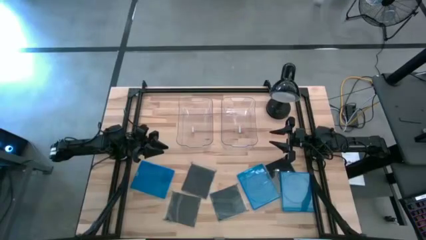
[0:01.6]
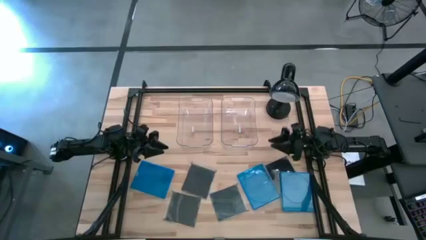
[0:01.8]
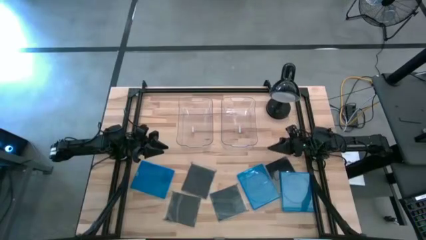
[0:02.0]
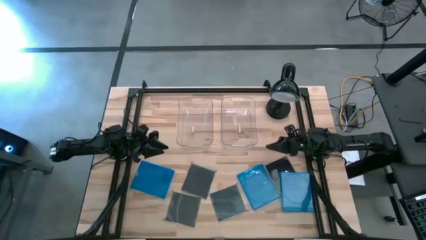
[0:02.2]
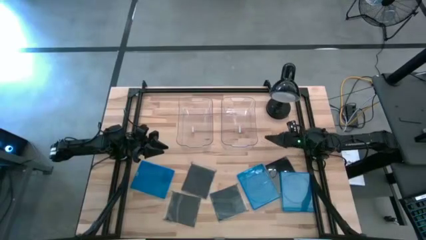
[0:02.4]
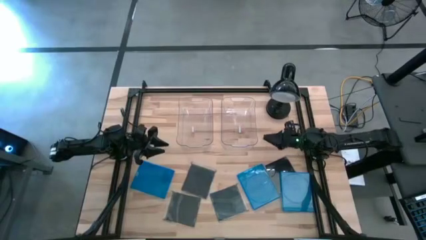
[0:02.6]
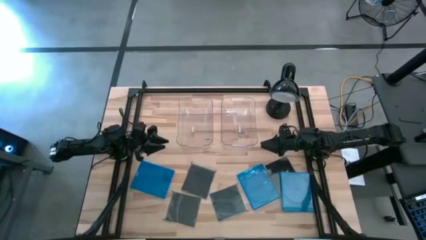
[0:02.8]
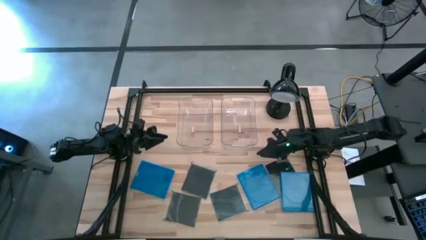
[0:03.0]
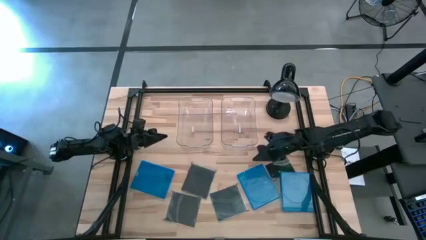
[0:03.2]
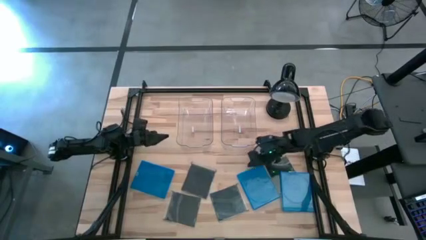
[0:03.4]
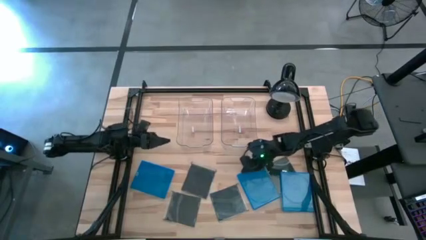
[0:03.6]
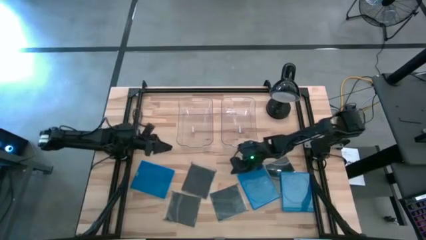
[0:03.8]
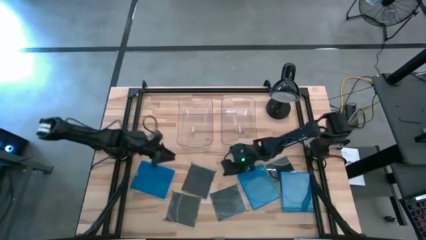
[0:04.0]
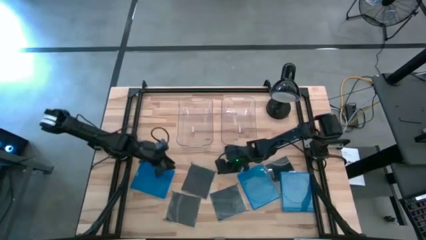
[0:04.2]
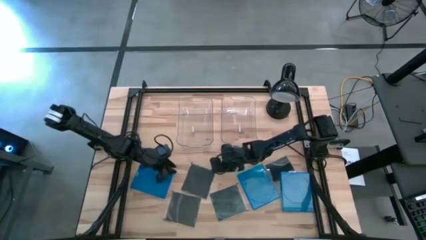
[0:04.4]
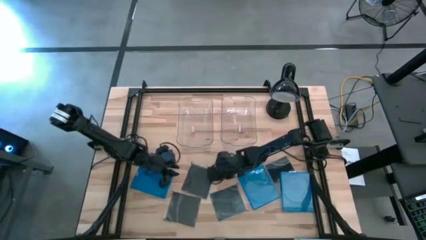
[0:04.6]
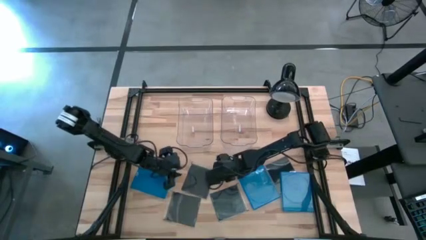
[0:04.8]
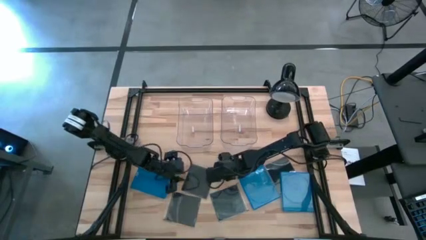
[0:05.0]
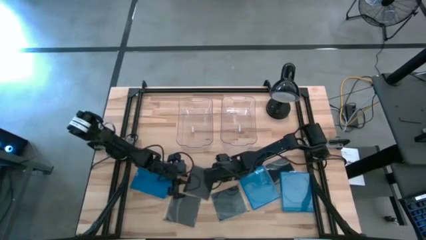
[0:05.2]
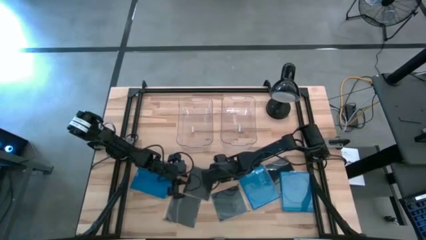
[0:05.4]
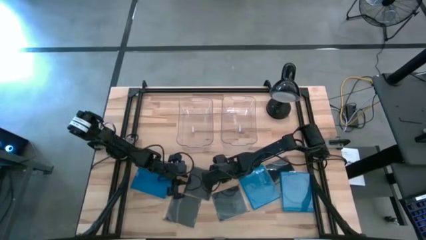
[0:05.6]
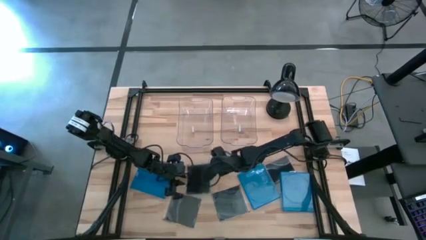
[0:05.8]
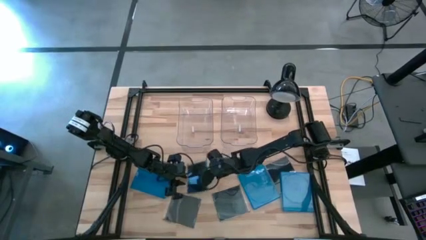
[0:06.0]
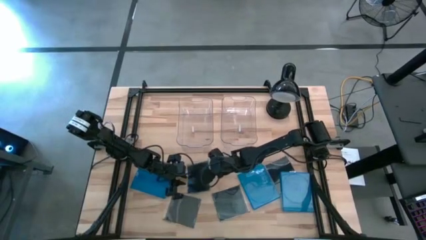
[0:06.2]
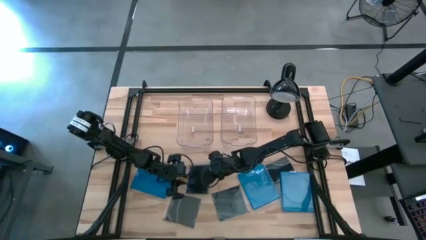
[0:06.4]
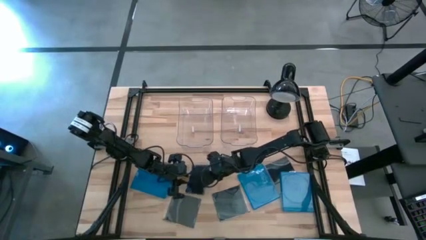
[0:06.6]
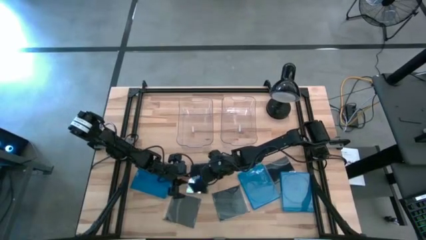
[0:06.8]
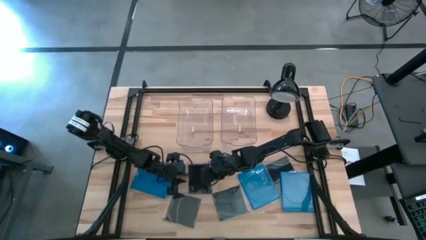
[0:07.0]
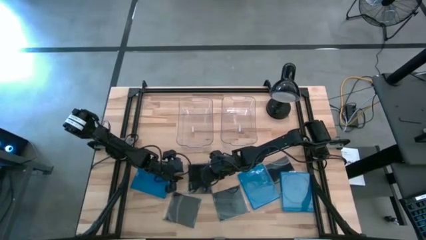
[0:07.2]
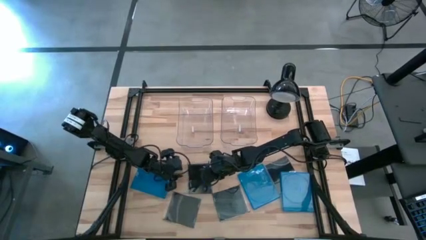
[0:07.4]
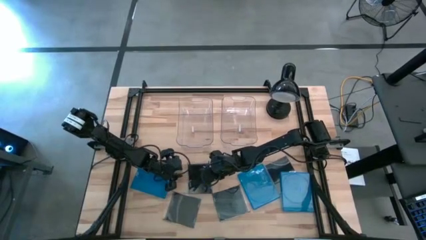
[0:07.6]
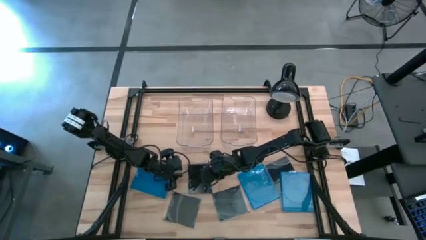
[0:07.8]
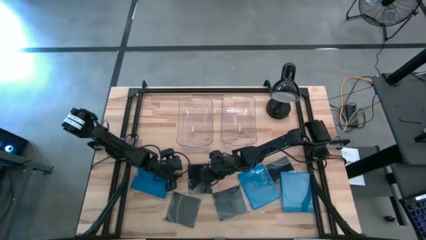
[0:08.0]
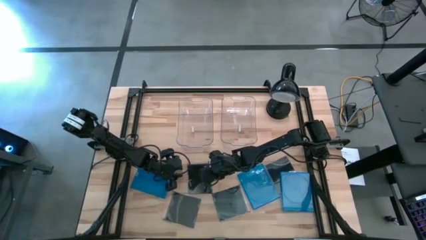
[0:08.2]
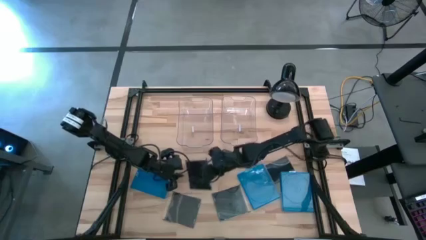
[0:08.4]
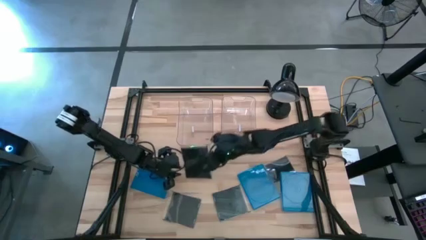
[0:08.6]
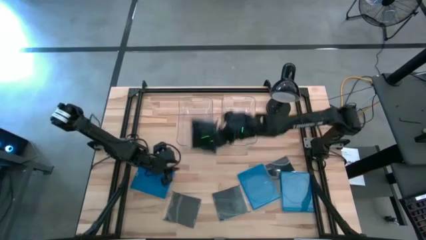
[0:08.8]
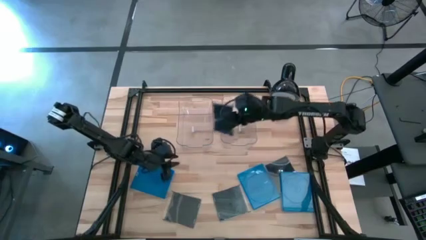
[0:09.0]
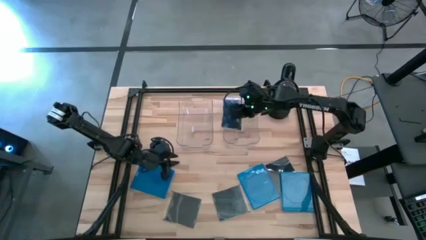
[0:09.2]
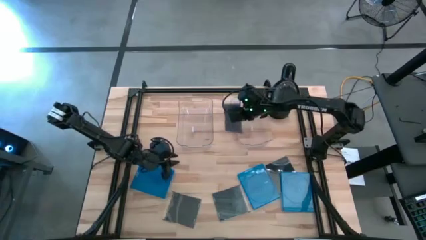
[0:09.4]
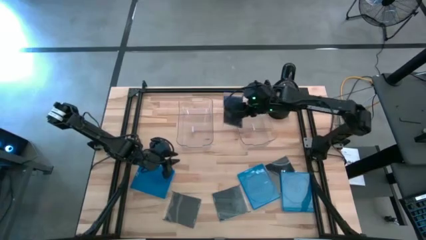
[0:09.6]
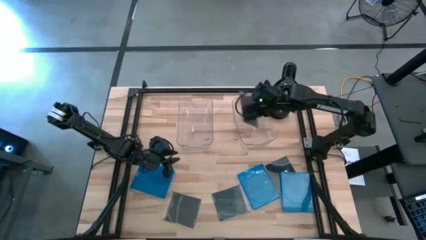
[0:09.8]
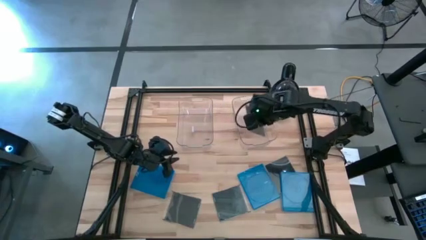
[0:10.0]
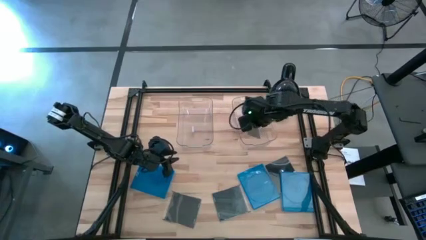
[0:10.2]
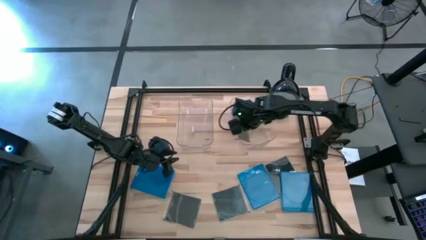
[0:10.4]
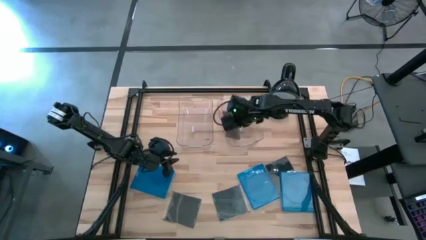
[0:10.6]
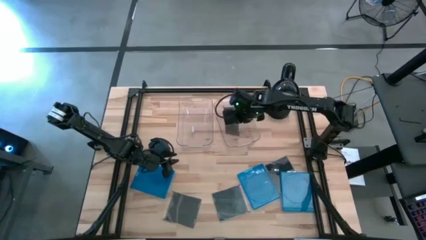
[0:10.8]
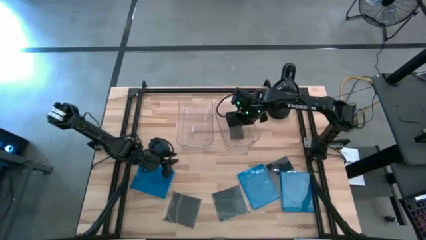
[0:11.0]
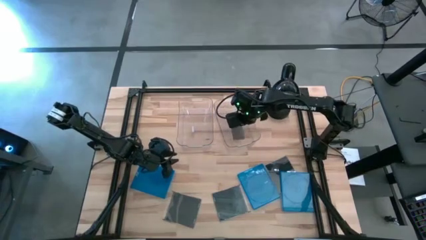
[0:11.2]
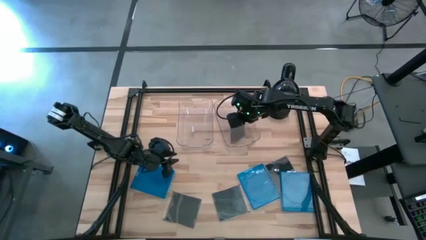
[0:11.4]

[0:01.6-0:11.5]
Task: Pick & place jewel cases by type
Put the black CD case into the right transparent bin

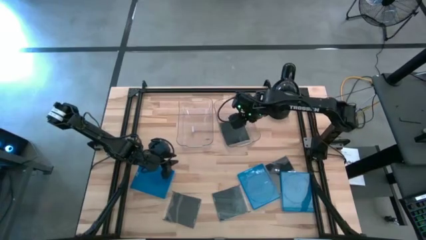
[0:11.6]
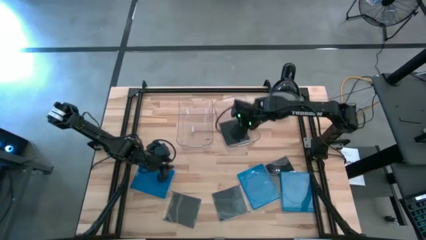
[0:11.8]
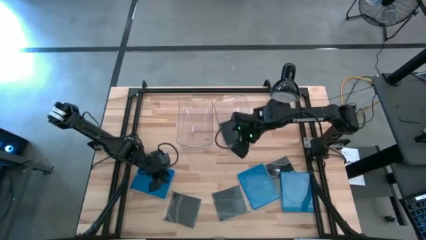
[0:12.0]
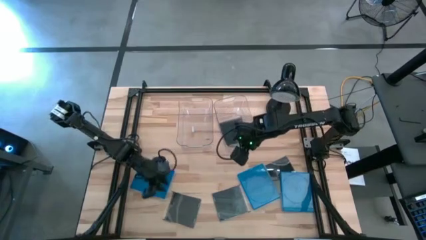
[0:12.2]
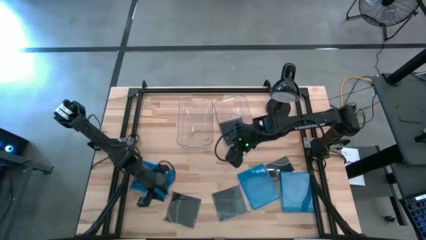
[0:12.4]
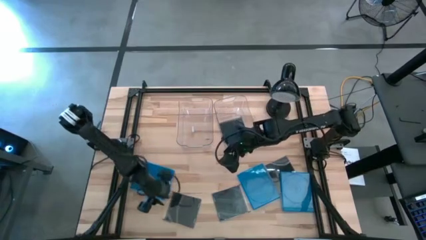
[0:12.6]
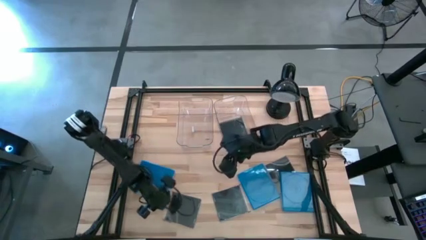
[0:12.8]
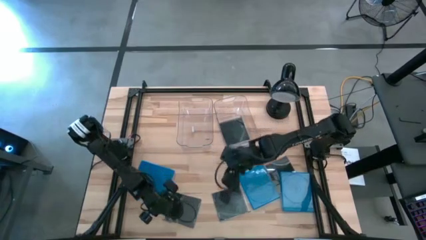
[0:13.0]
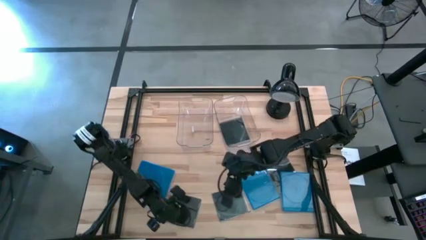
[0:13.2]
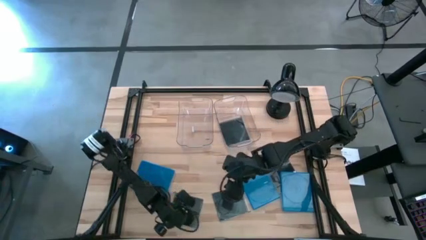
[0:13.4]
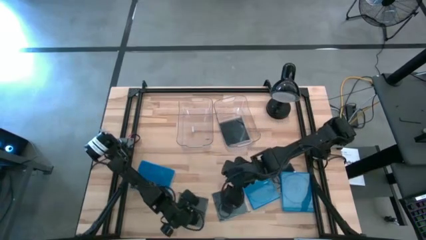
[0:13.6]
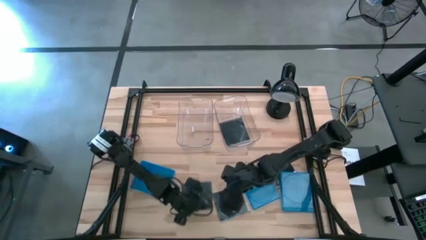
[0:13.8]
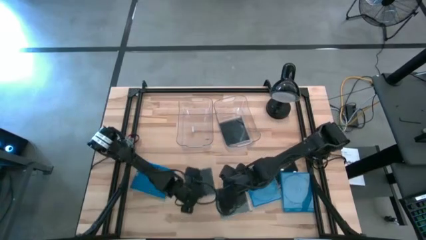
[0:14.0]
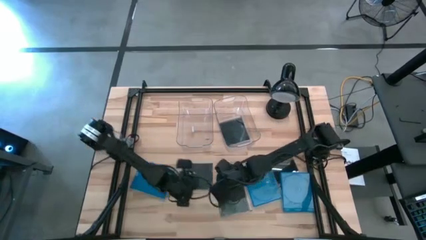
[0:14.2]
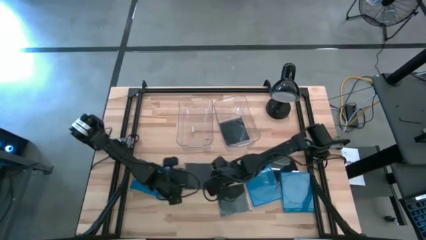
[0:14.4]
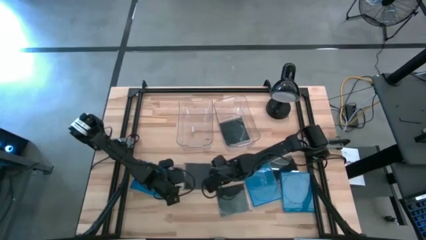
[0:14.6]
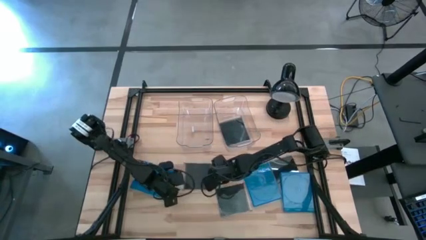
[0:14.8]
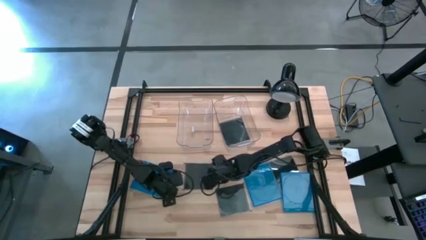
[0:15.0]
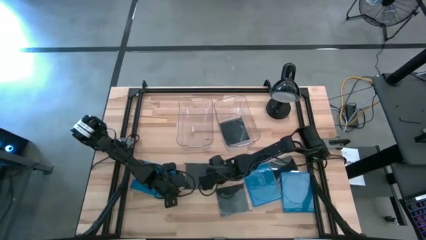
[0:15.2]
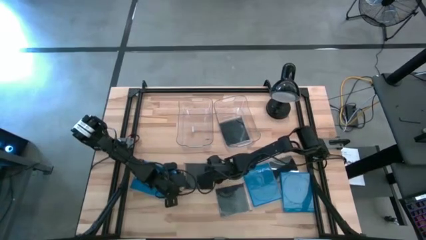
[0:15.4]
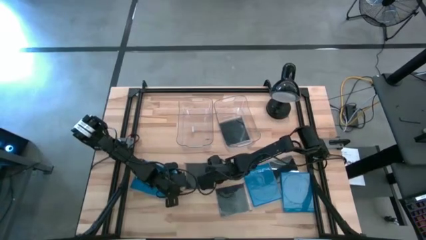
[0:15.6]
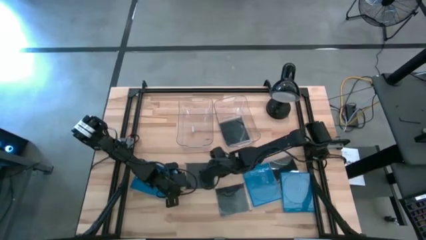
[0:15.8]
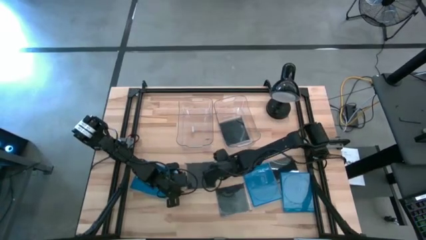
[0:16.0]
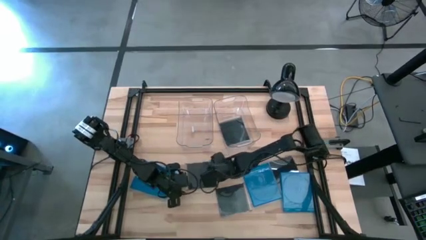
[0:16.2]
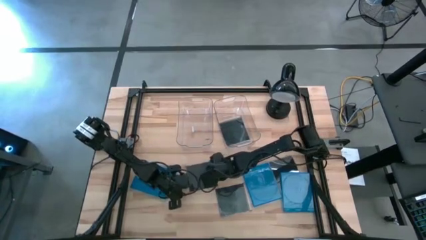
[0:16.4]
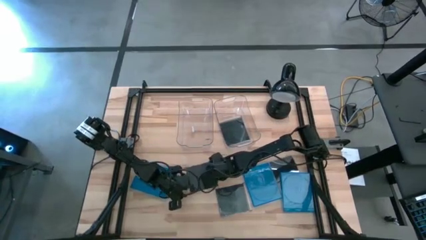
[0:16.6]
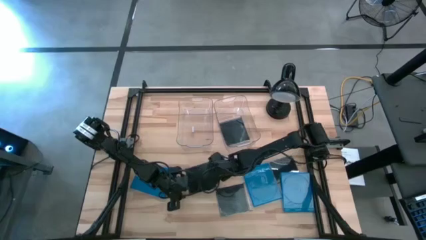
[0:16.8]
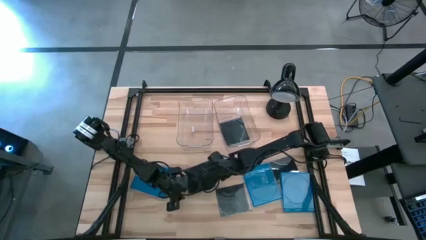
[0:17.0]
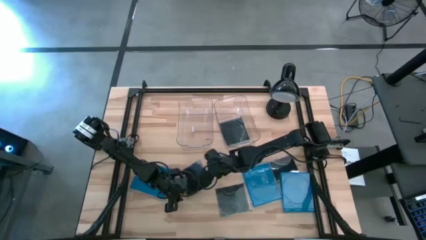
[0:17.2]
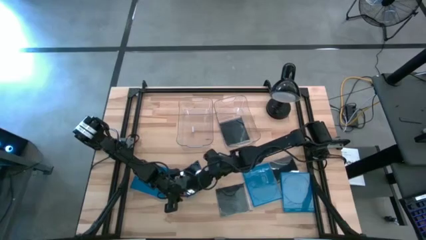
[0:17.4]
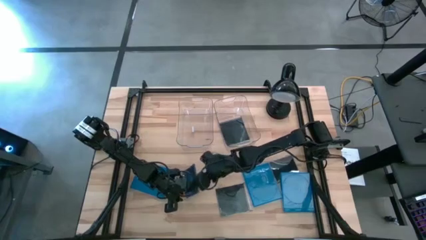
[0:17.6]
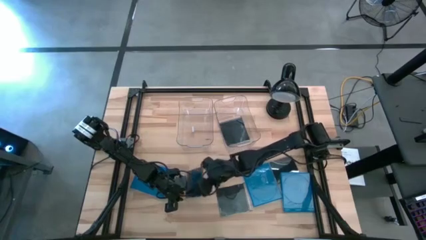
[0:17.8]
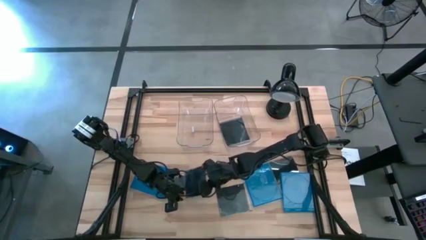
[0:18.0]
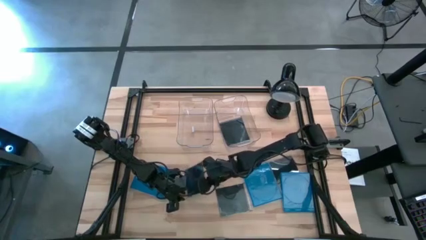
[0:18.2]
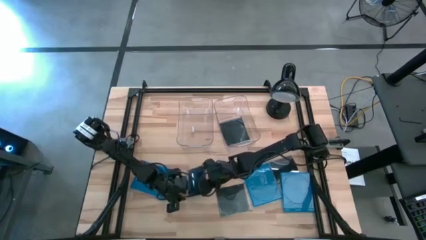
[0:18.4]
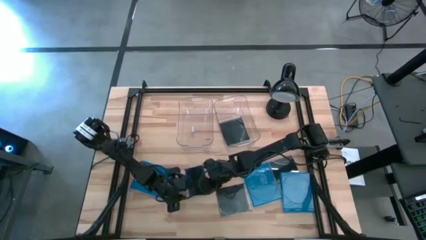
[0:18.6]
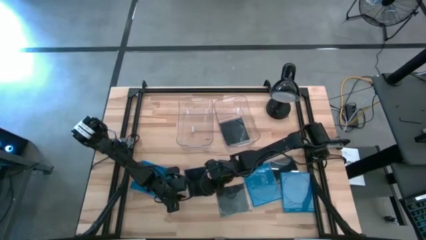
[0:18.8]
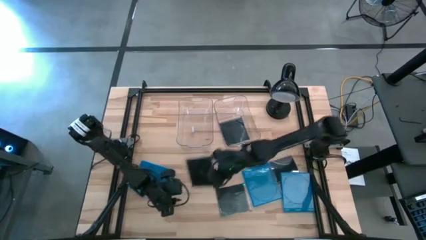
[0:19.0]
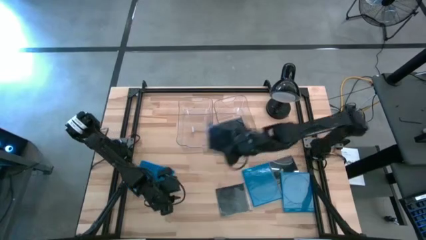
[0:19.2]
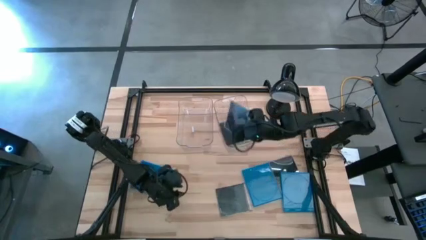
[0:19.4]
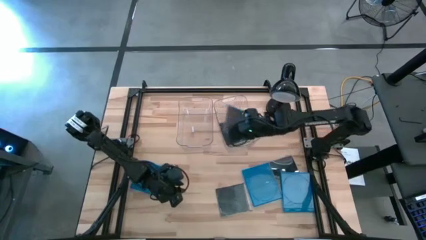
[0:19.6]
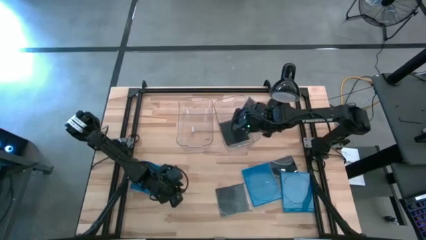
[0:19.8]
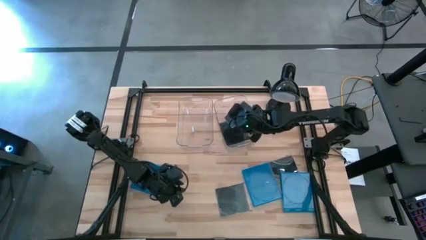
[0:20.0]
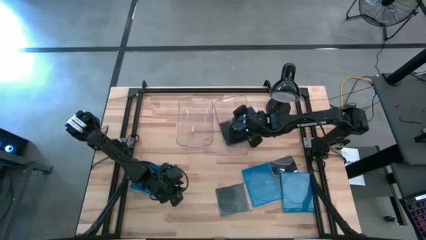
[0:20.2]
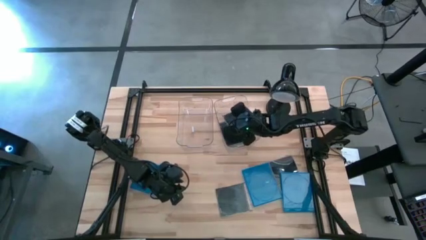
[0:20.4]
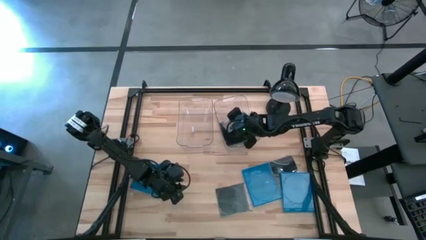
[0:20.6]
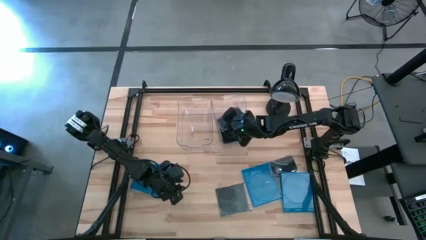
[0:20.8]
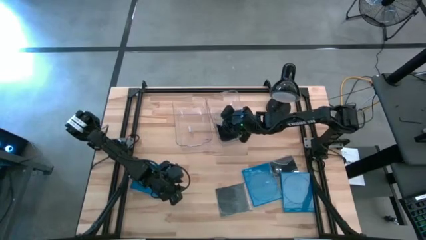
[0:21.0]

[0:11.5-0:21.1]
Put the black CD case into the right transparent bin
